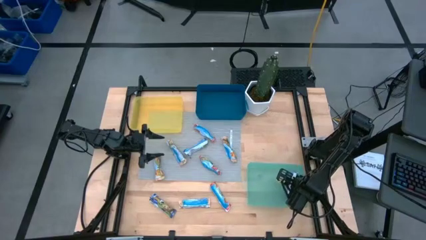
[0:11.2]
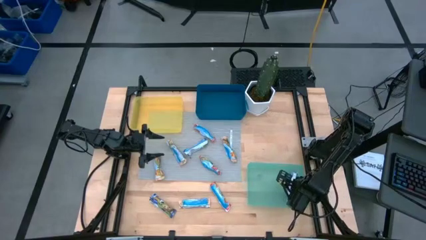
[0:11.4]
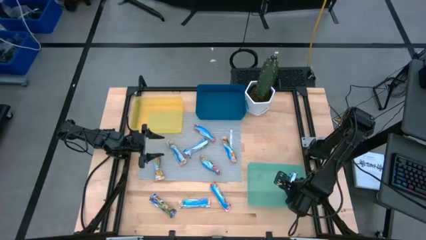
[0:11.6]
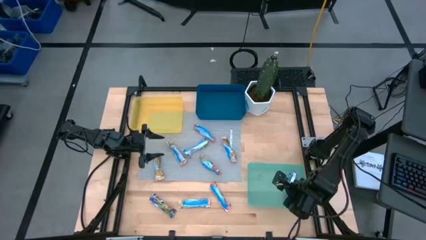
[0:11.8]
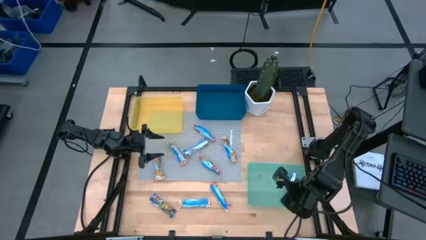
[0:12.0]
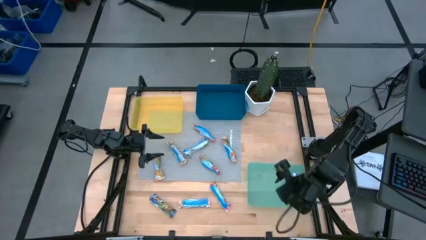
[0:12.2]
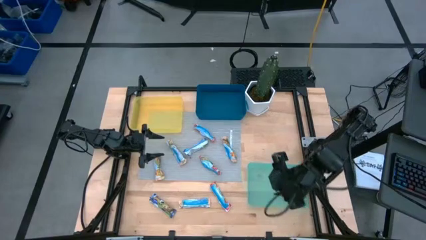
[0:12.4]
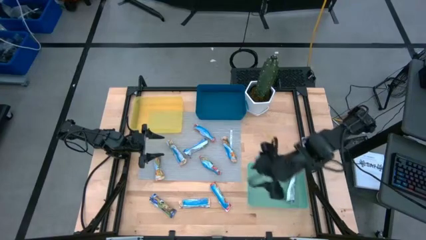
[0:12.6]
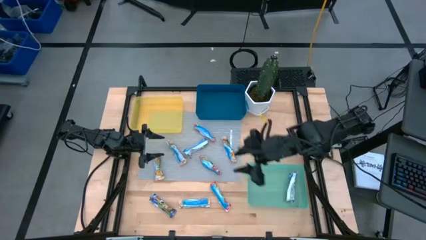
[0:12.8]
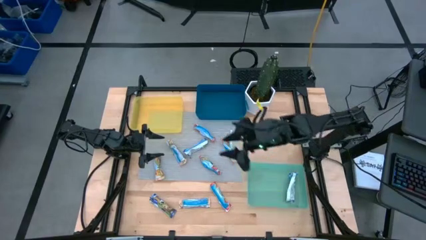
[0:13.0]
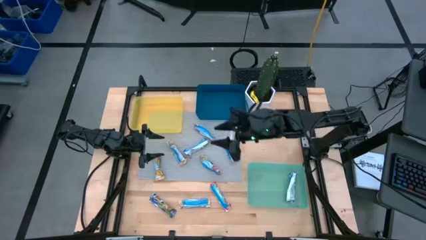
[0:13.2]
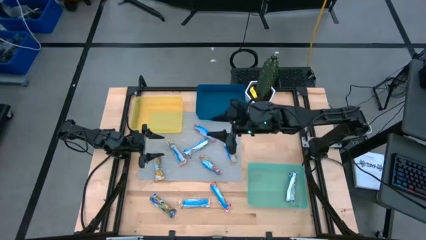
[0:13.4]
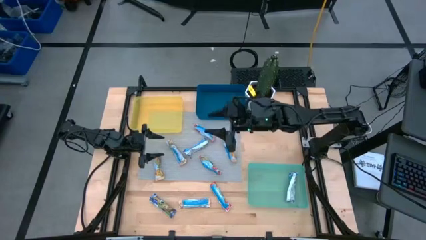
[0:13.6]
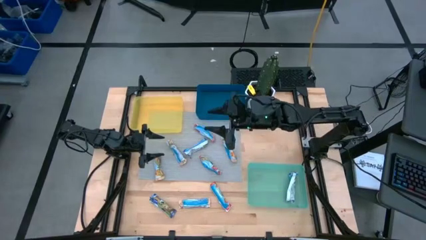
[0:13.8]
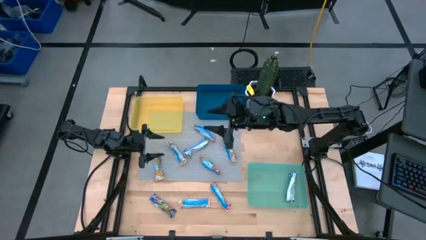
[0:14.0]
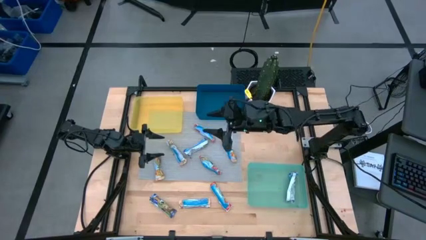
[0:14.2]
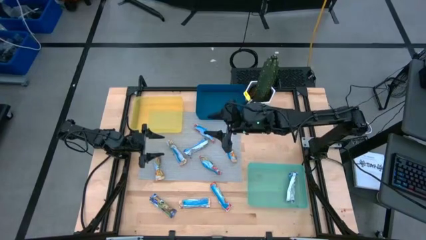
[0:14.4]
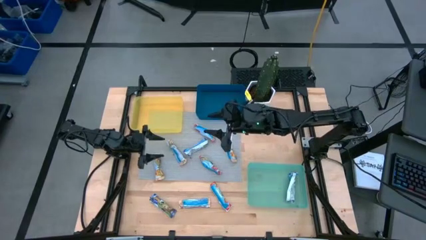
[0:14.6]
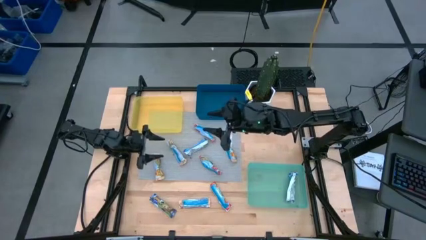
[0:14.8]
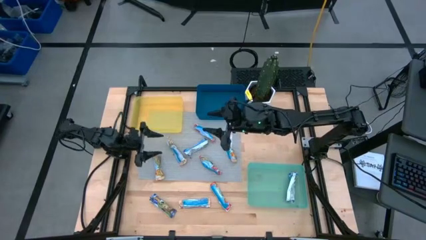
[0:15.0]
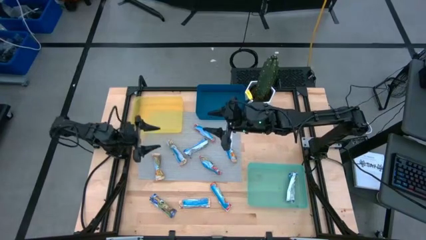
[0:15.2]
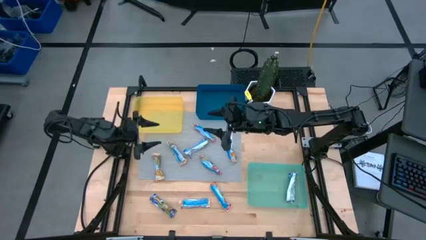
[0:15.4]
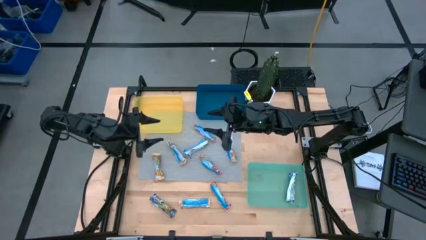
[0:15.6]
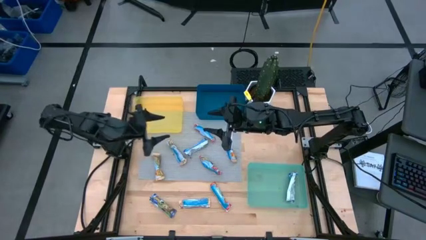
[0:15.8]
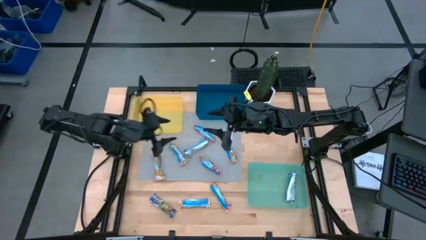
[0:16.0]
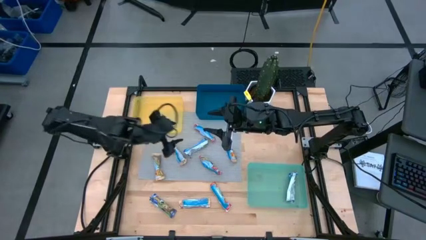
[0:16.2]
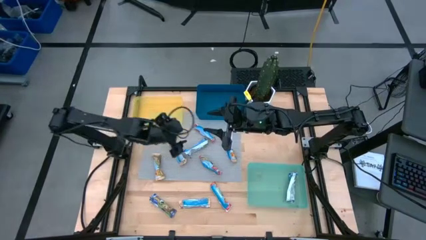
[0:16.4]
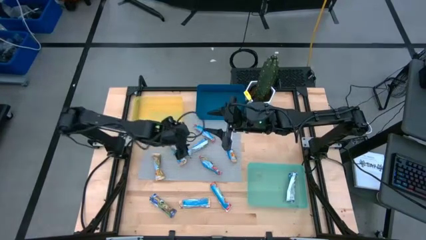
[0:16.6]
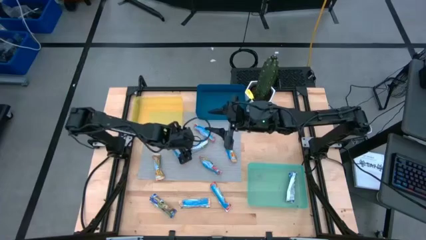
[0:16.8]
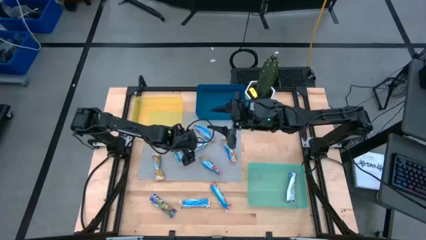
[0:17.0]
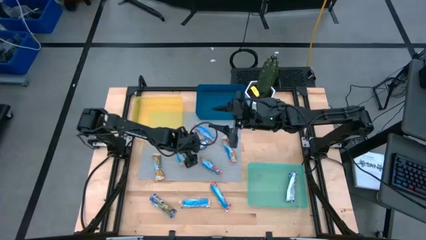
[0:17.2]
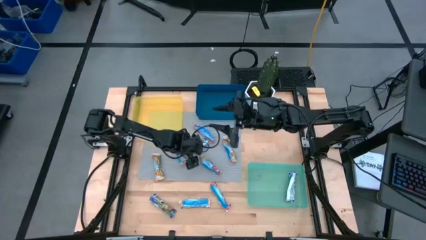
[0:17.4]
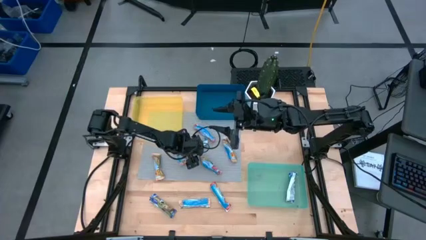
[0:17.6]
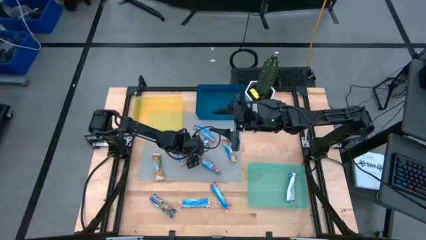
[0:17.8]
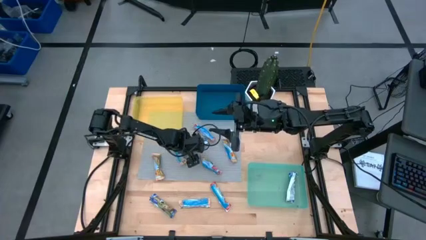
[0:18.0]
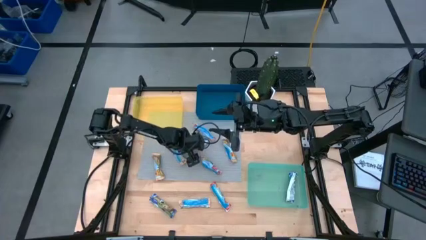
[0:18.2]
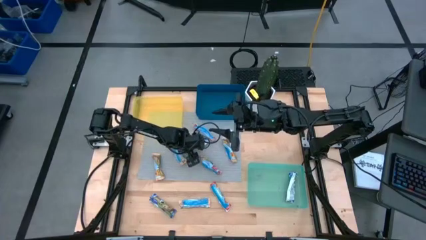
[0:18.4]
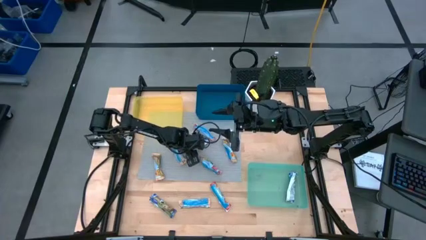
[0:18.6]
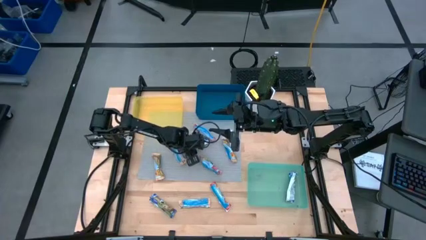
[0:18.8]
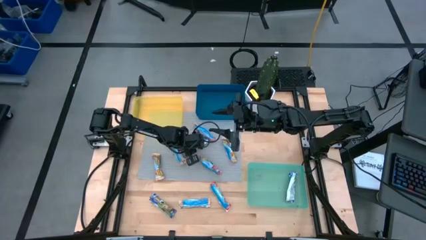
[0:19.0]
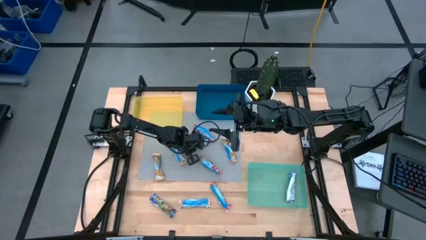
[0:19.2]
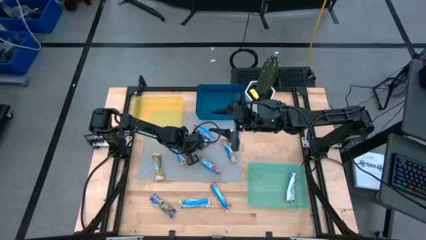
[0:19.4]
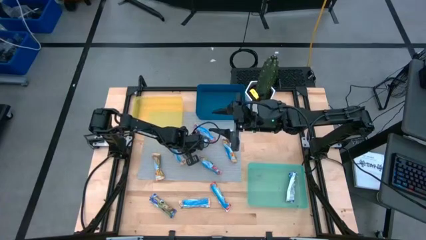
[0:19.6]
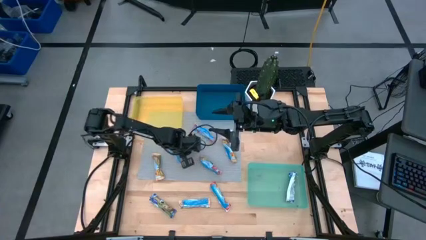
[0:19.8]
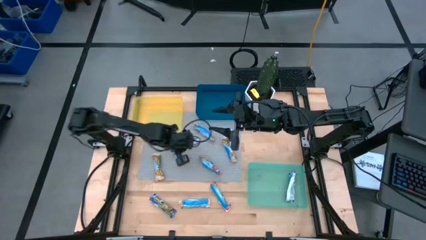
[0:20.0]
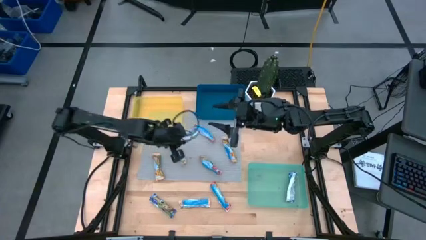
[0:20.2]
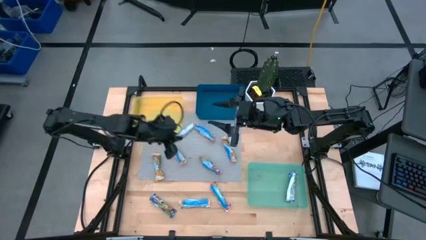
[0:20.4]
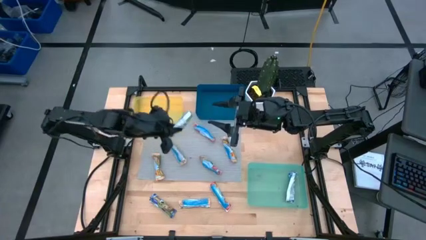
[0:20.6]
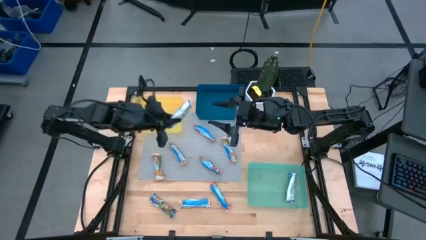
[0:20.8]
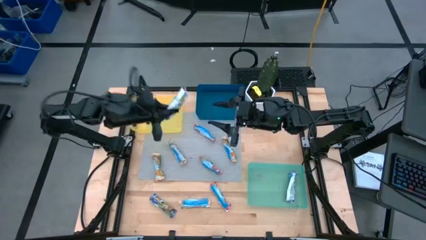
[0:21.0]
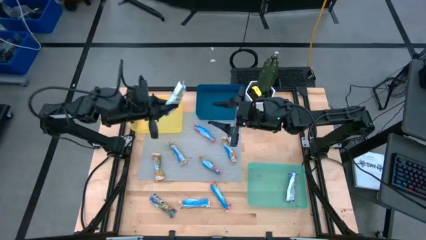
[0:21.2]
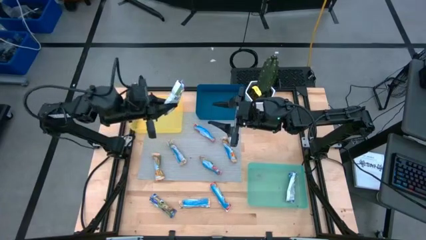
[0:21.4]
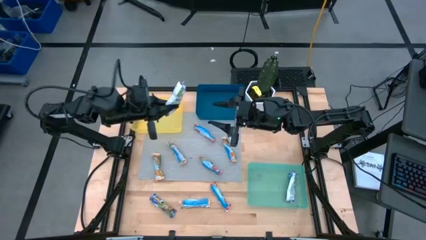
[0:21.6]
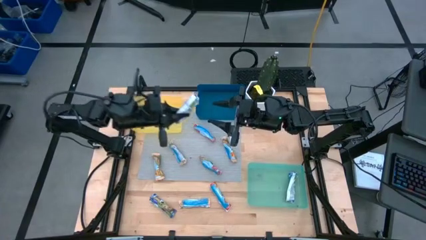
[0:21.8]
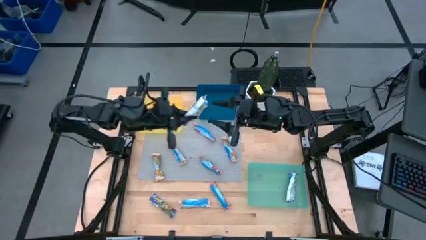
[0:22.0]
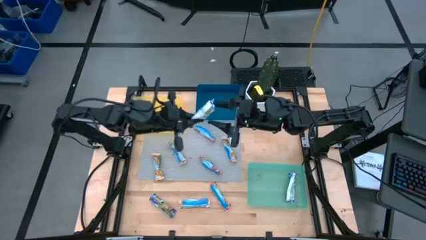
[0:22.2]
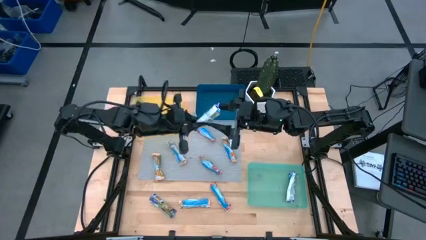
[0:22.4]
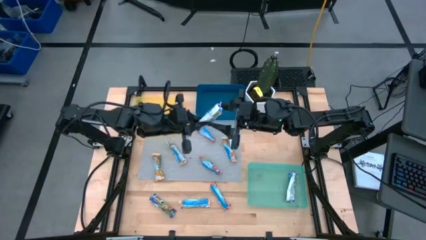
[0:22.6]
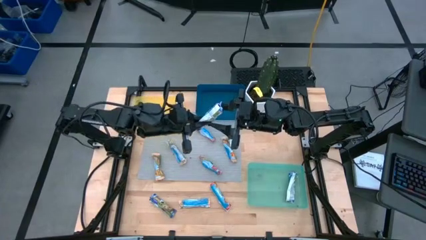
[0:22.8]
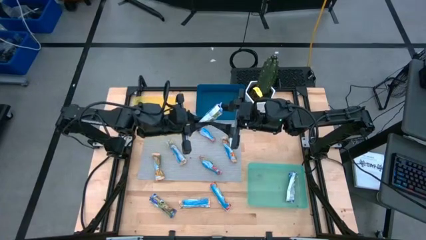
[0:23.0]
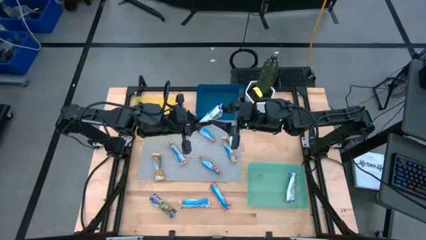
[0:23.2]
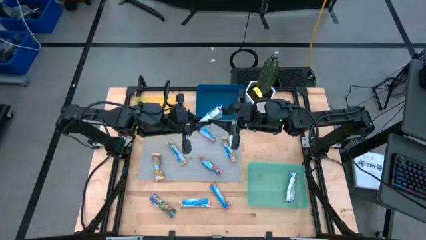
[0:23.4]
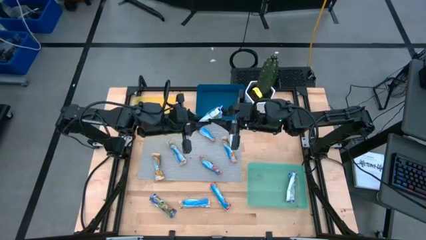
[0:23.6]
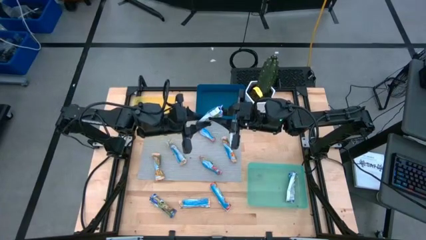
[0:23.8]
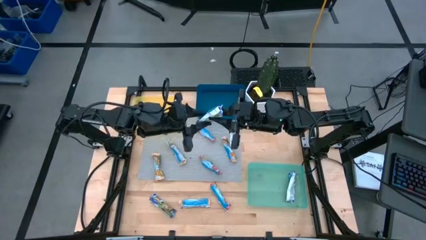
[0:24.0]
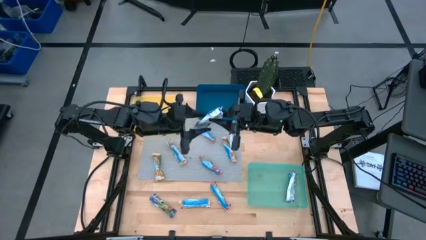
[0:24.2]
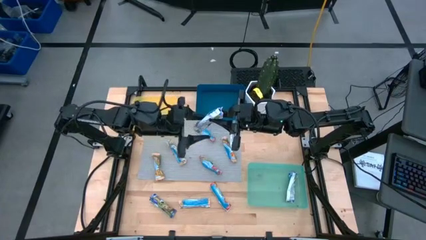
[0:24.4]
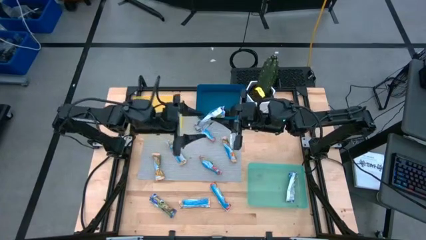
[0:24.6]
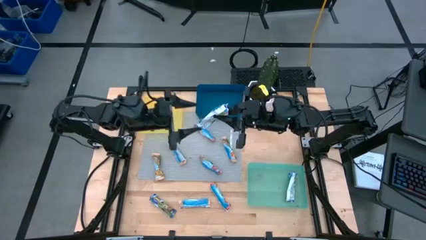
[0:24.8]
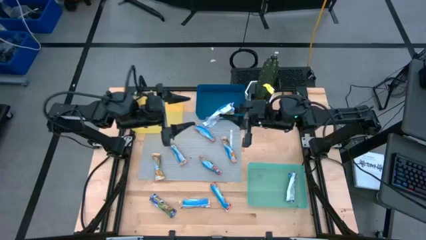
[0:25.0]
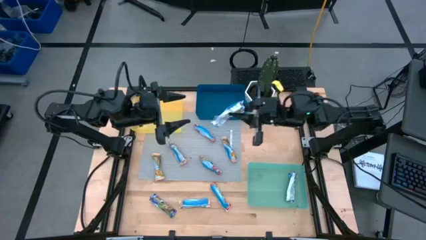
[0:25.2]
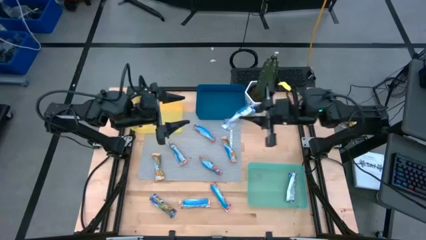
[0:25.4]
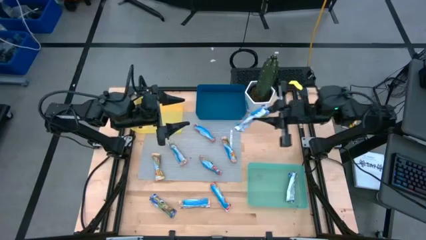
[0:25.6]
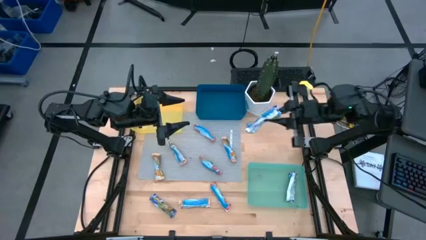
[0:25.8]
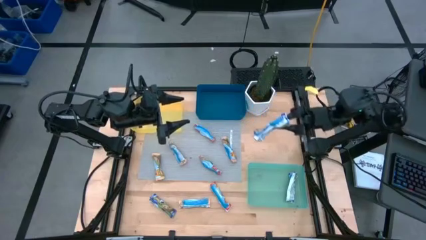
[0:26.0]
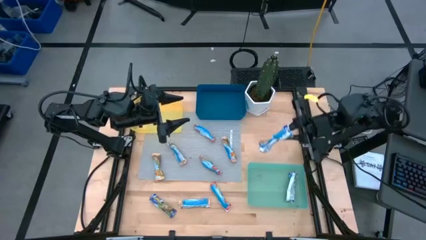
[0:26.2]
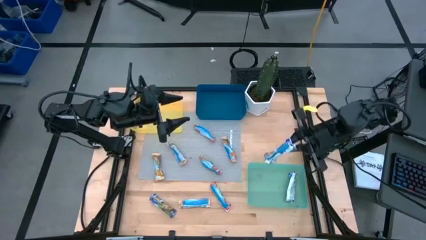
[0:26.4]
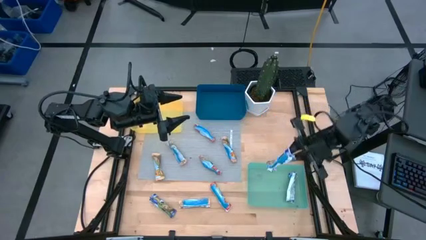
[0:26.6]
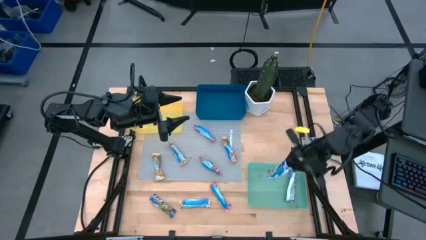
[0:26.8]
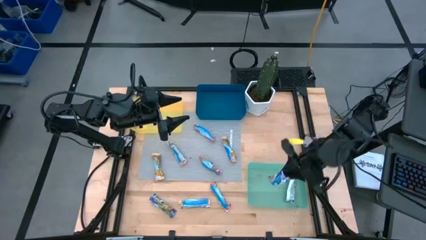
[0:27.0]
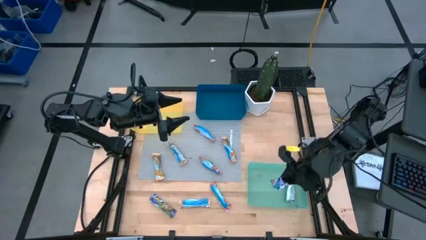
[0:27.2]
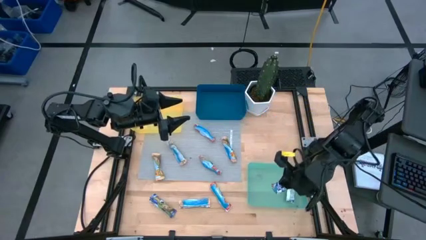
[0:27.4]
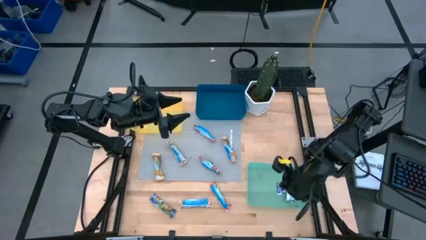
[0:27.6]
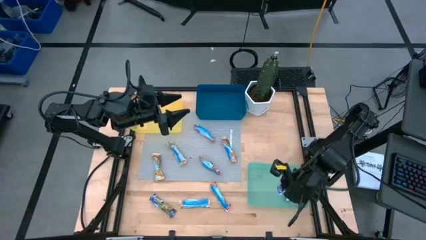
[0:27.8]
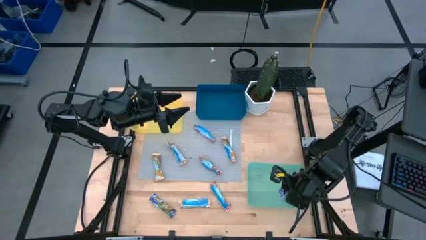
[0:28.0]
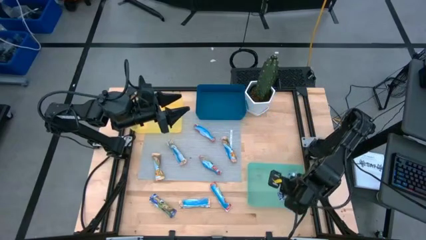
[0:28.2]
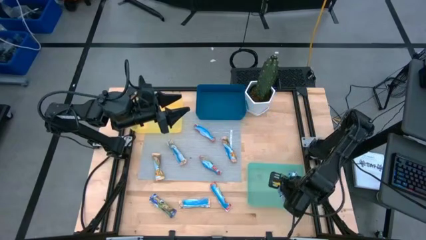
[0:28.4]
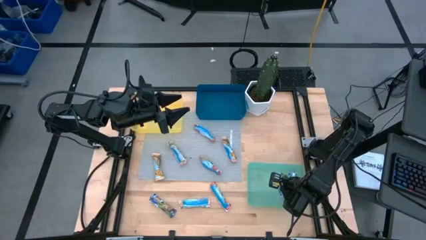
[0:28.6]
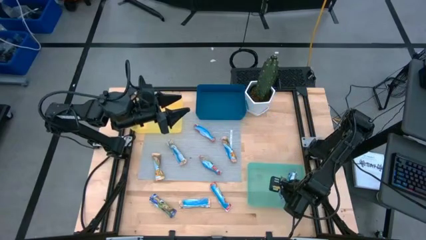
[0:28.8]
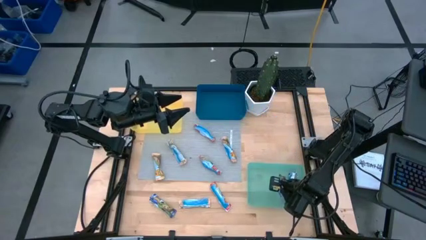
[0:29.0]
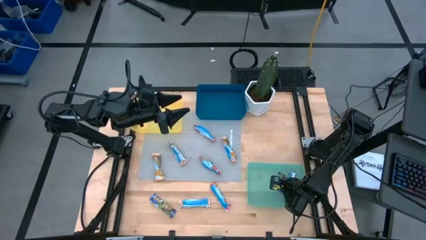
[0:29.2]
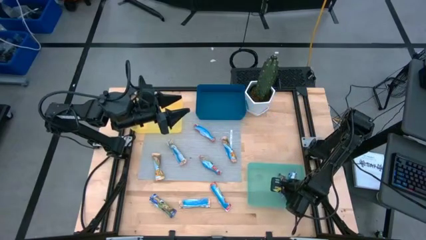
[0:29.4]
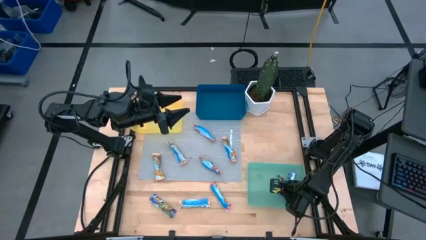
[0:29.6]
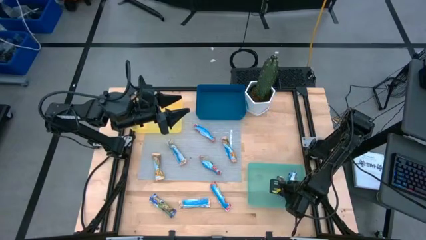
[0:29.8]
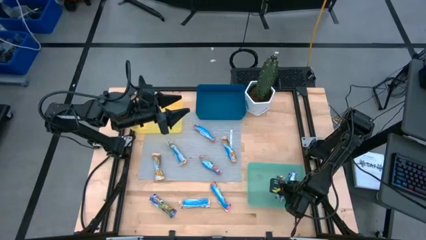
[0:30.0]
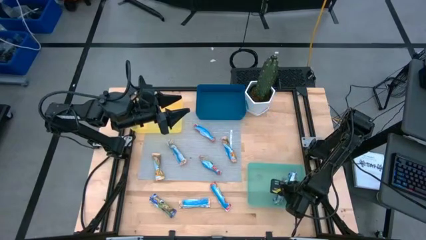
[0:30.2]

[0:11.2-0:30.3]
Task: Pick and place Granola Bars by type
Put the blue granola bar into the green bin
